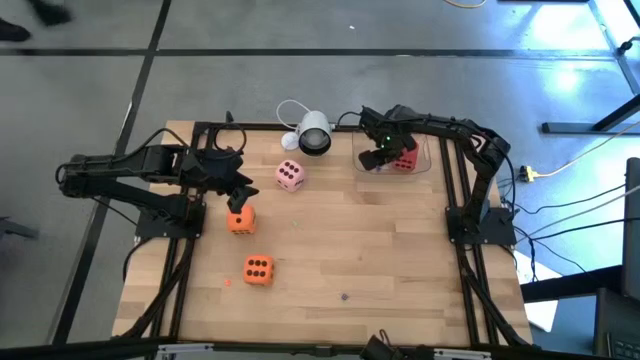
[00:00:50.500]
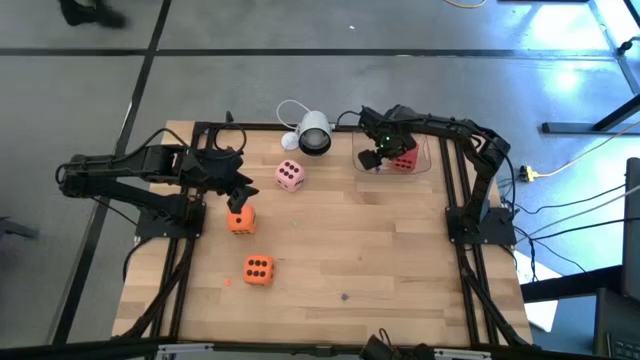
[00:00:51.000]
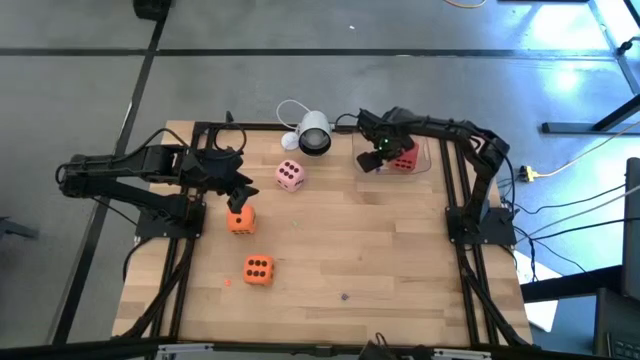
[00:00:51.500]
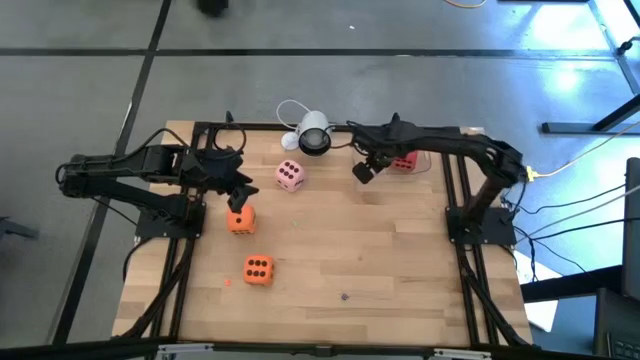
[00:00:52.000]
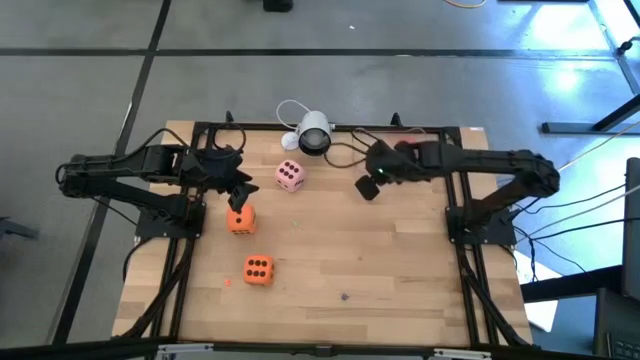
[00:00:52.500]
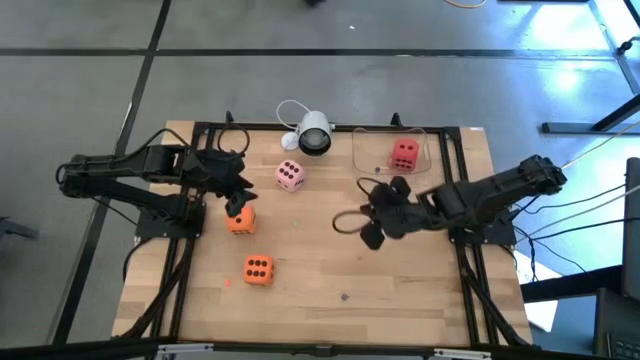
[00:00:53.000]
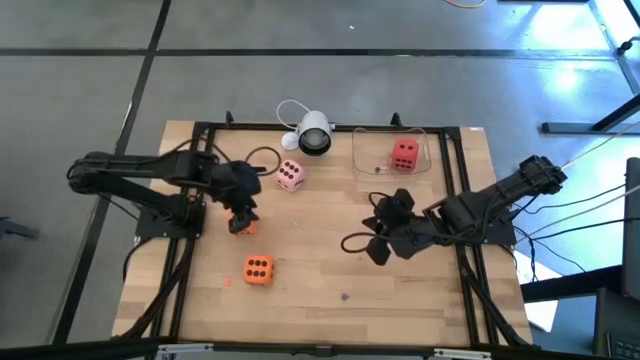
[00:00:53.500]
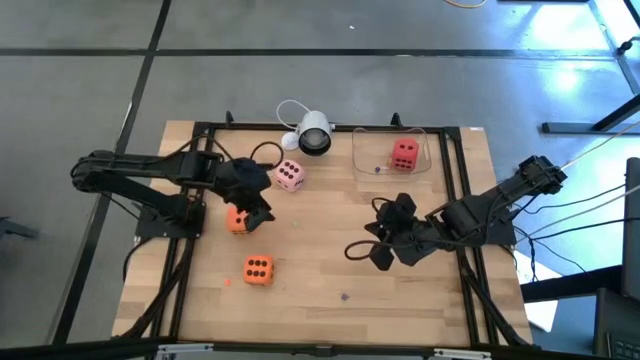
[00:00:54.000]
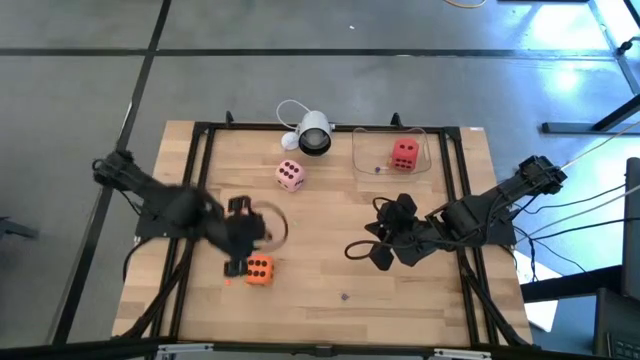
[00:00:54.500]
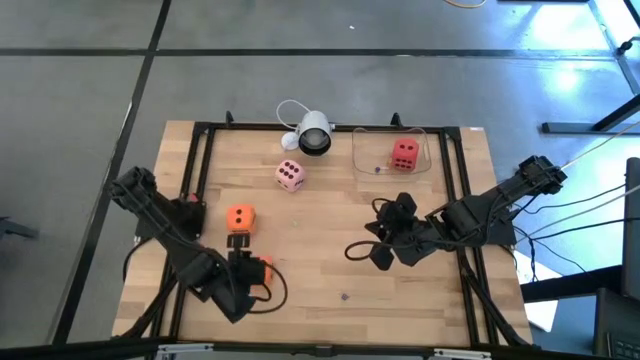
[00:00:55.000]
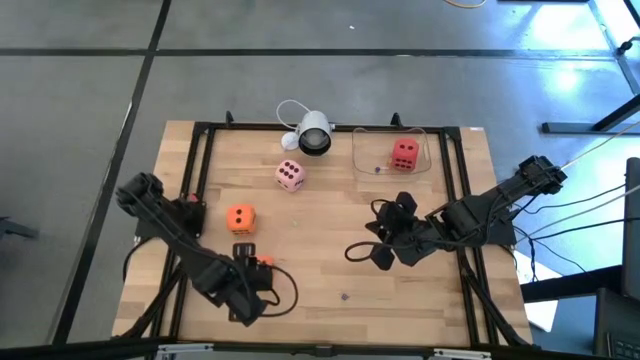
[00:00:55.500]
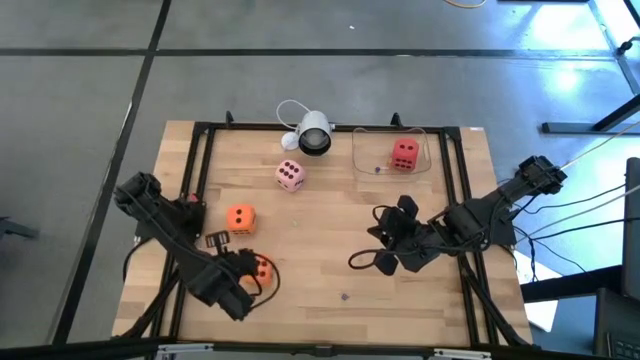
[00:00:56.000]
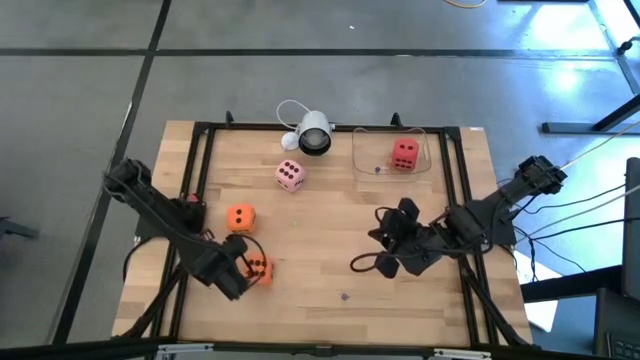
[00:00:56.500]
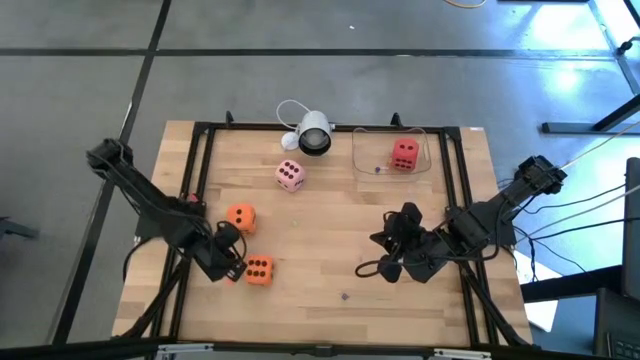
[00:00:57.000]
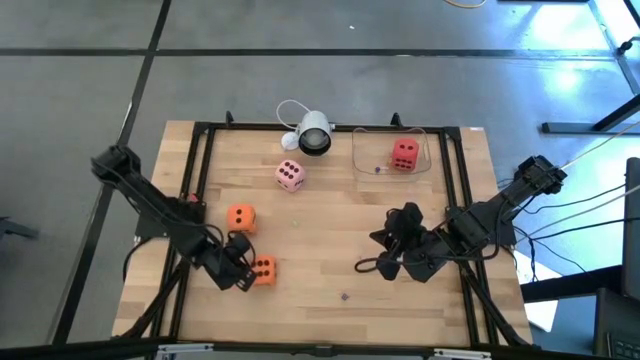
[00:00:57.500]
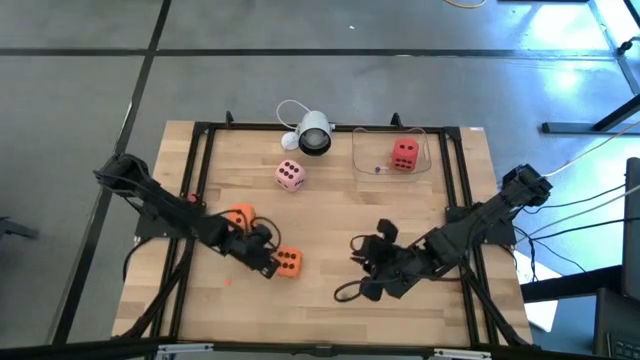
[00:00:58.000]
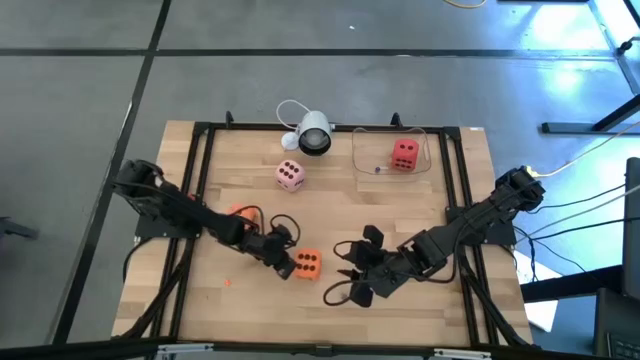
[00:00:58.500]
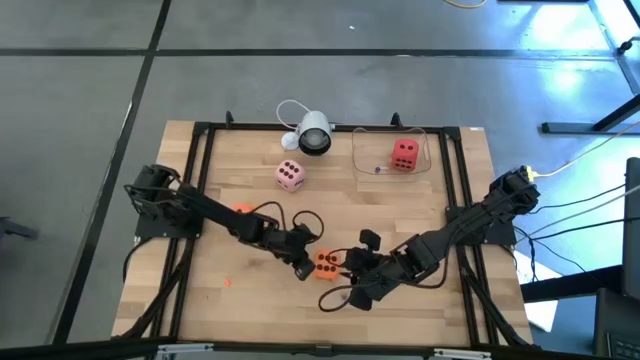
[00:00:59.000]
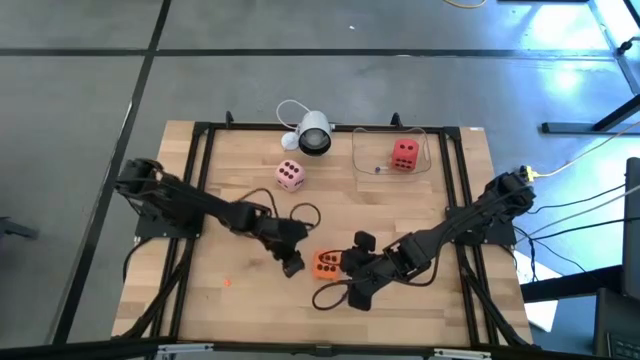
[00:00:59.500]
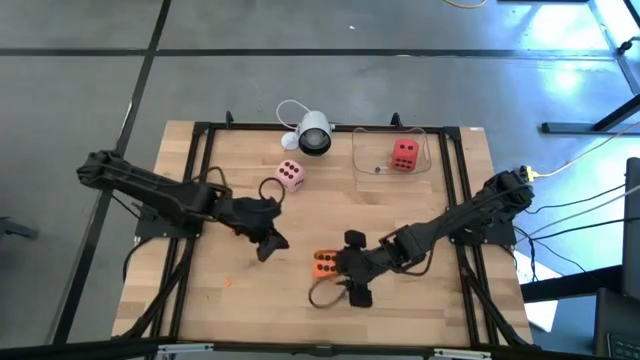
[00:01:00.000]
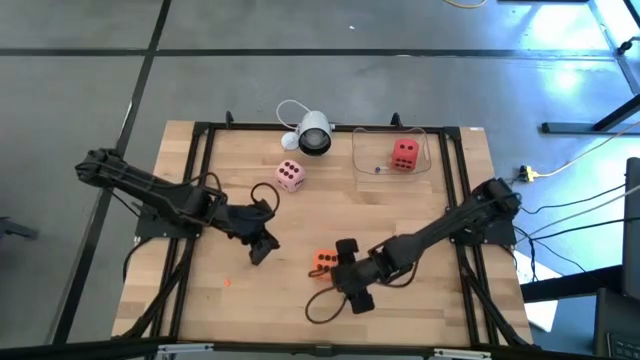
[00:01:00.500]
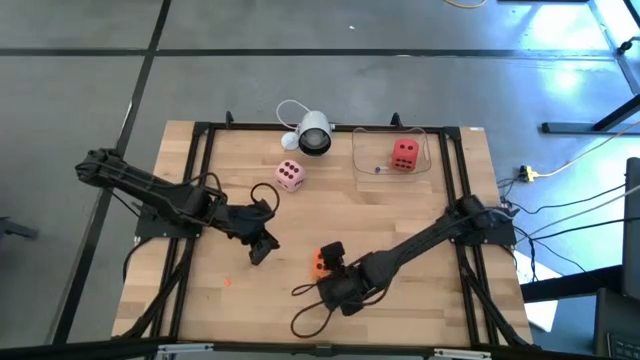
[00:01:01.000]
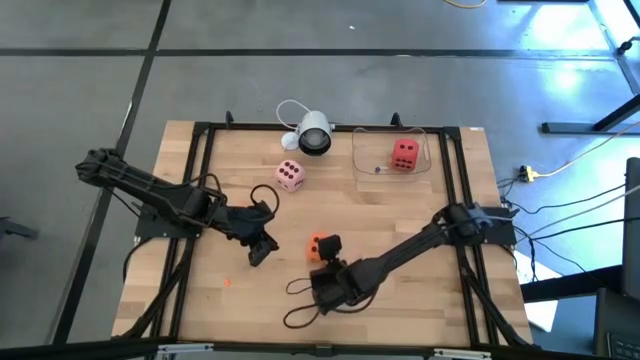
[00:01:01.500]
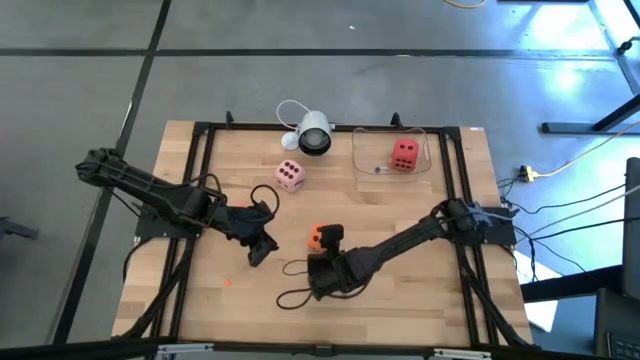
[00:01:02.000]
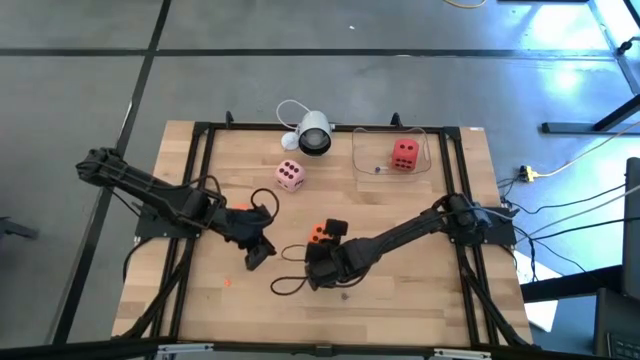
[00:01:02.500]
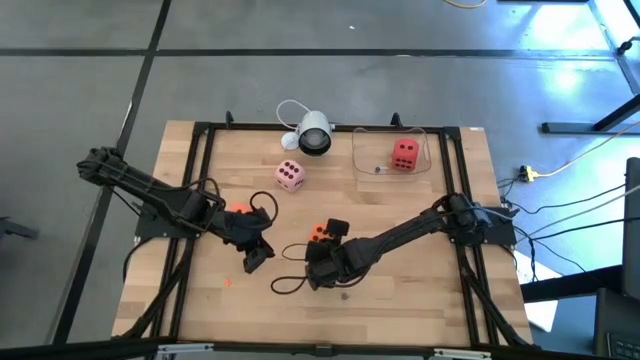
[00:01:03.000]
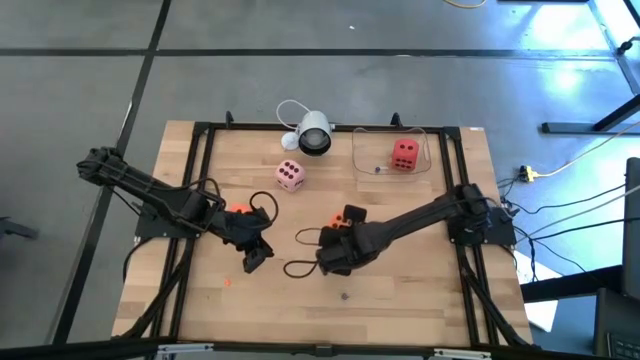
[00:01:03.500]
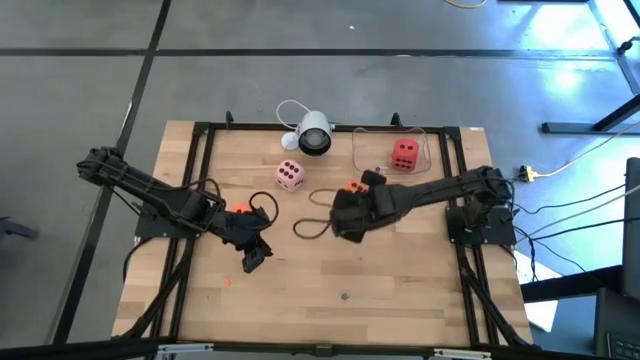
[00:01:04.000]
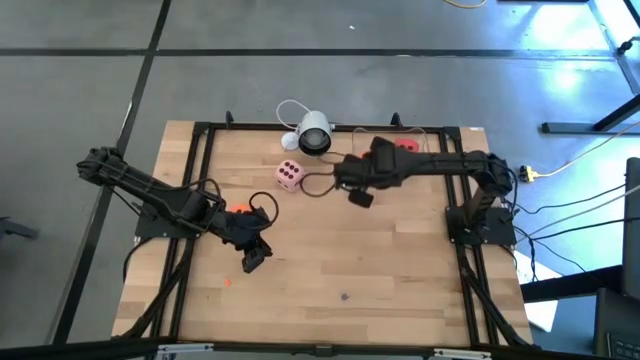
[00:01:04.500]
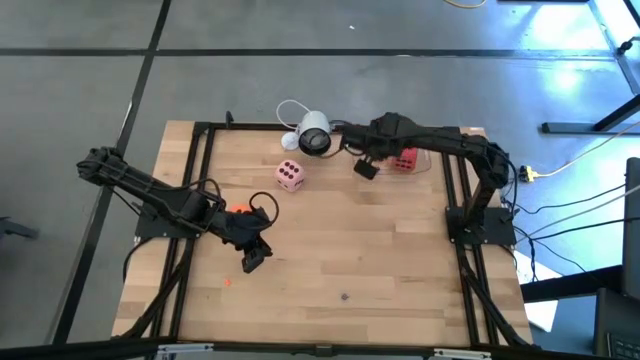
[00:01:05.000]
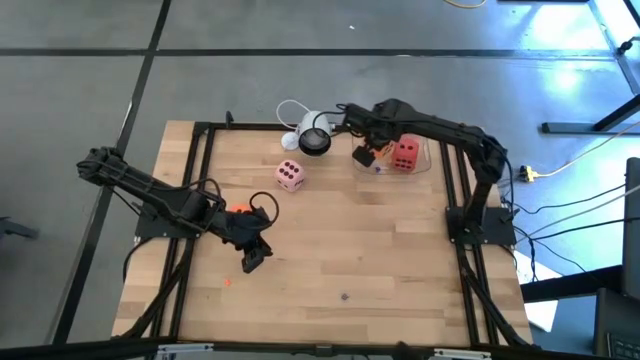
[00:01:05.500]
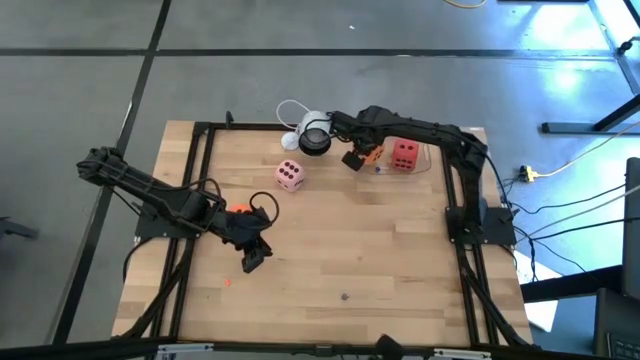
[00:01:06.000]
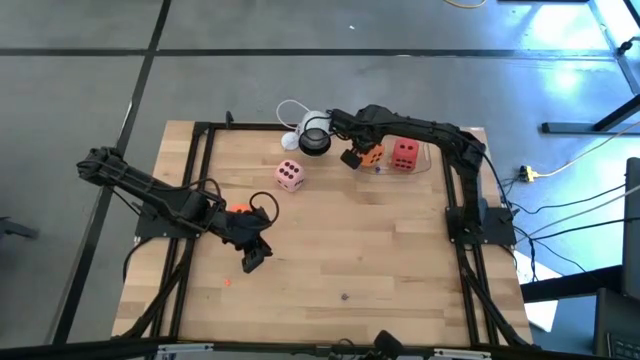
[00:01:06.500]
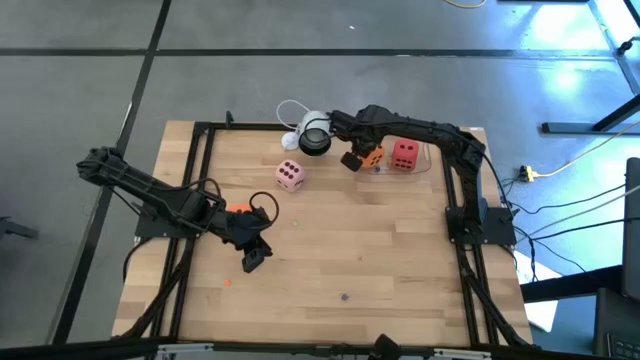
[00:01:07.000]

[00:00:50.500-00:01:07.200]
Task: Pick & Place Dice
Put the bottom large orange dice into the transparent container

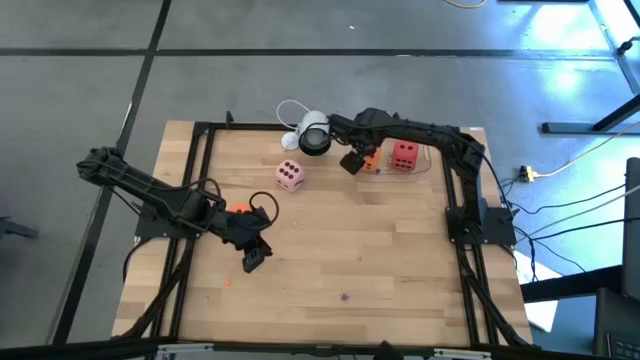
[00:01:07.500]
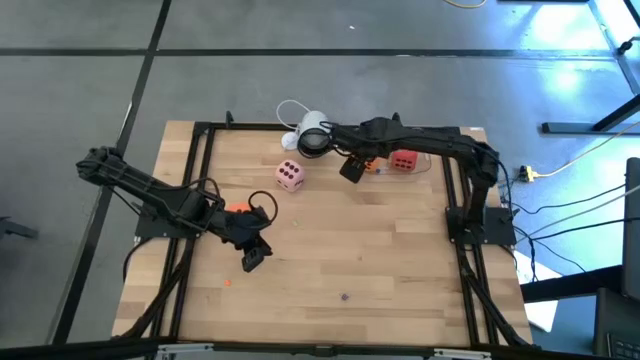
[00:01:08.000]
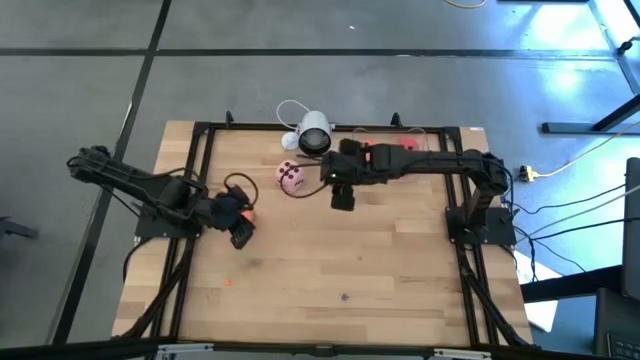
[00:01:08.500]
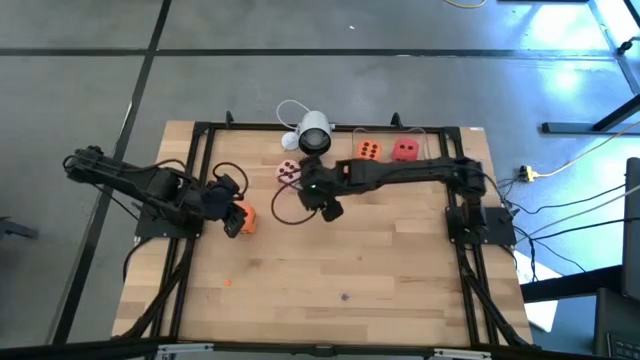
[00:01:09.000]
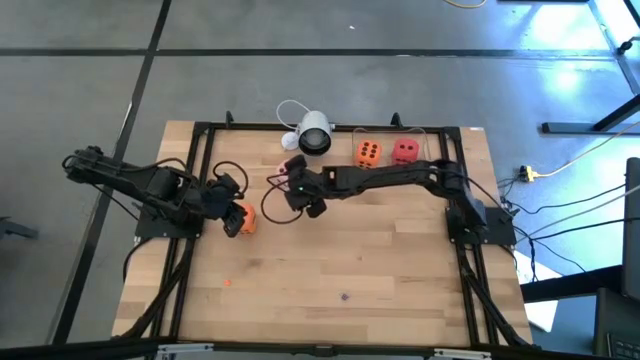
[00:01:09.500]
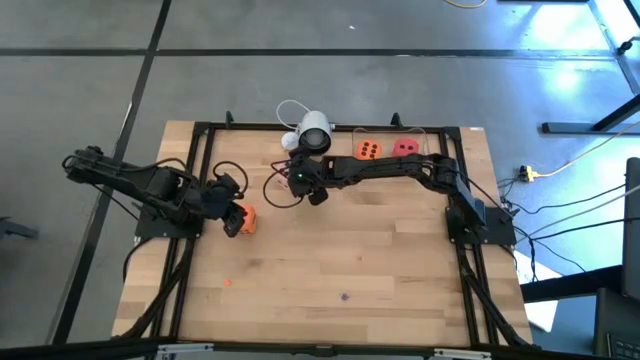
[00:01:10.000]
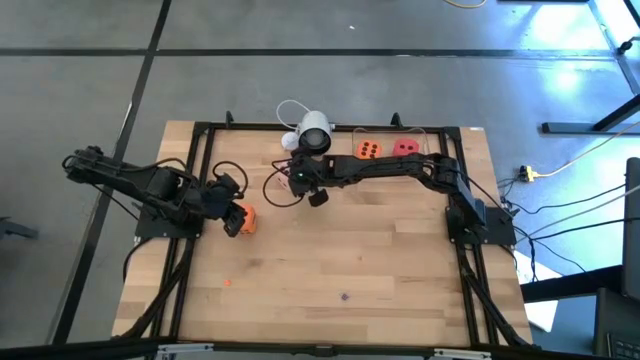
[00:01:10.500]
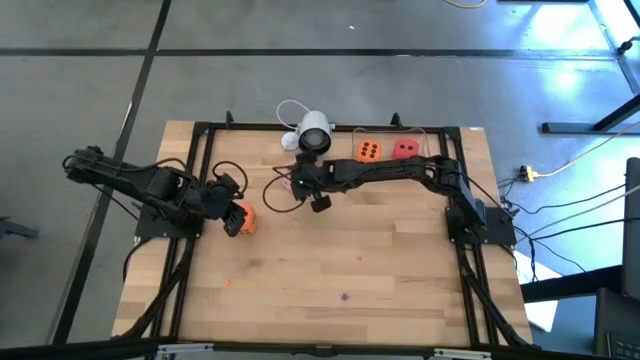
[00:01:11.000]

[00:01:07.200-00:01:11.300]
Put the large pink dice into the transparent container
